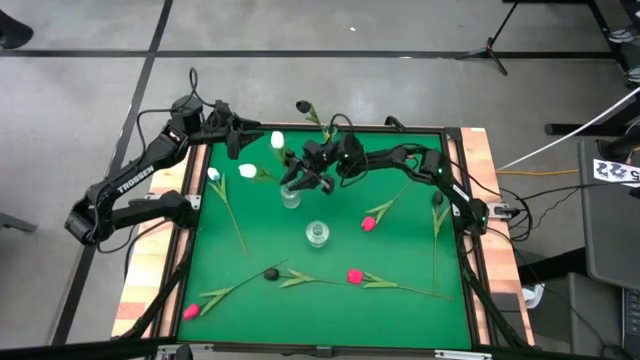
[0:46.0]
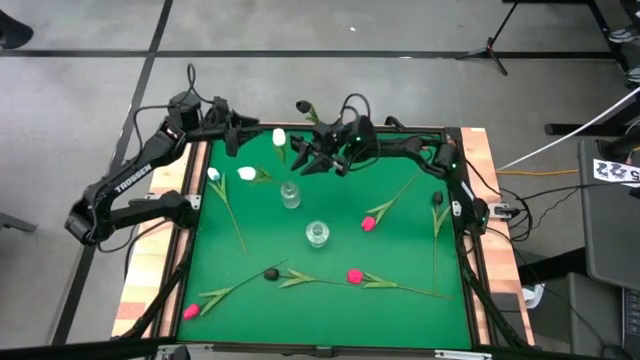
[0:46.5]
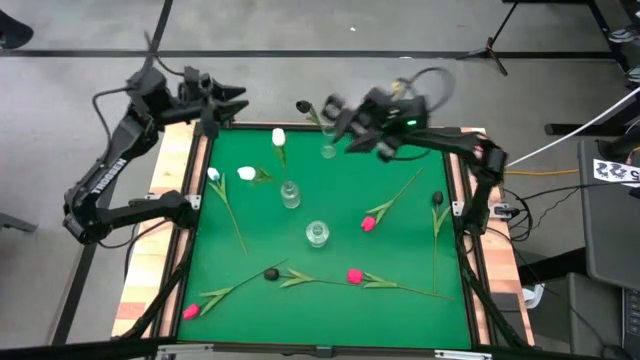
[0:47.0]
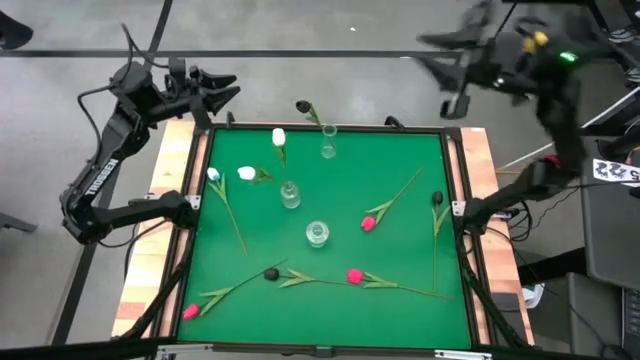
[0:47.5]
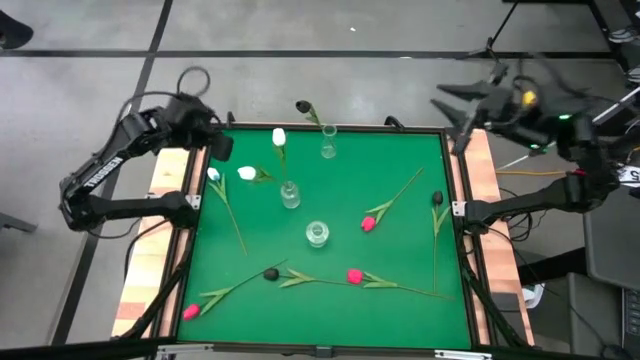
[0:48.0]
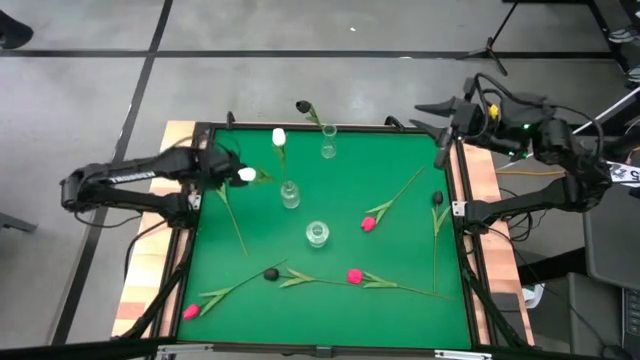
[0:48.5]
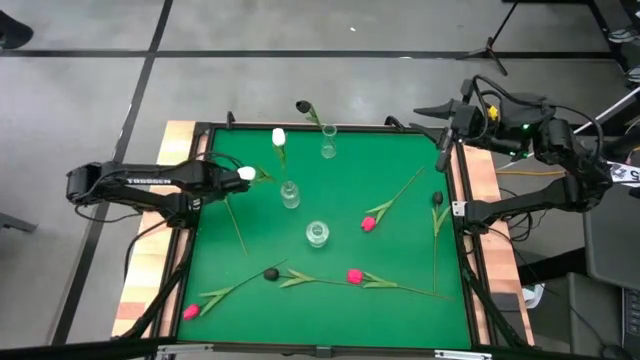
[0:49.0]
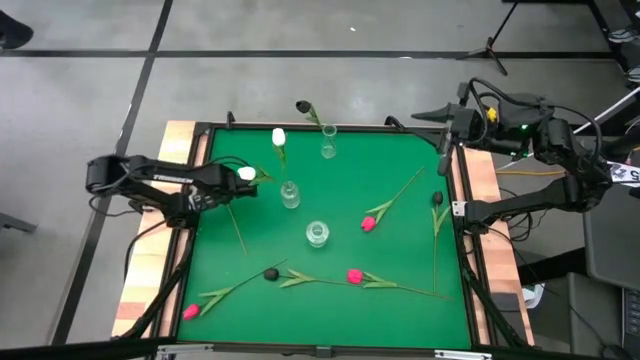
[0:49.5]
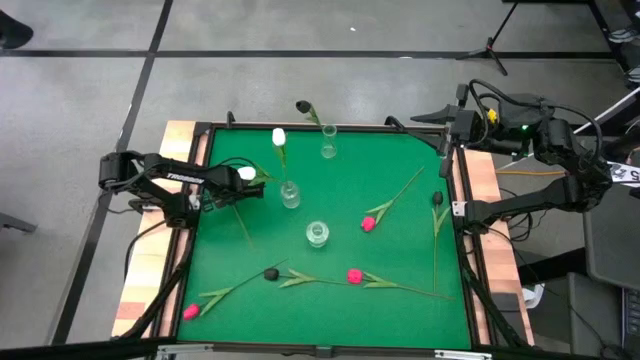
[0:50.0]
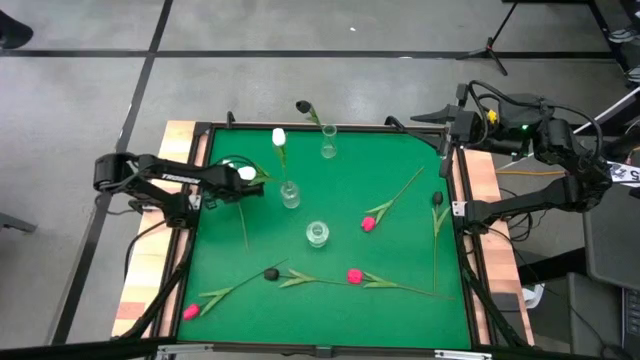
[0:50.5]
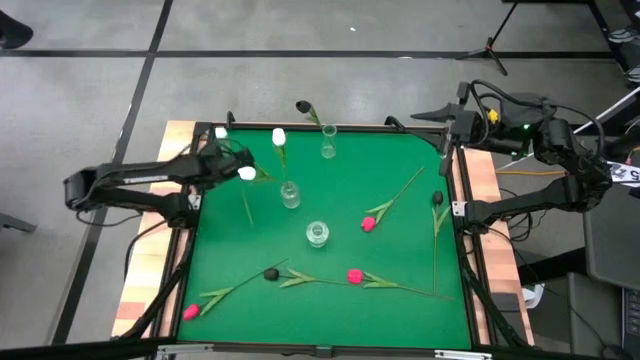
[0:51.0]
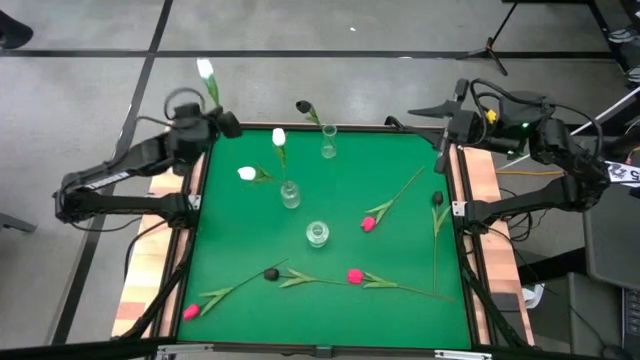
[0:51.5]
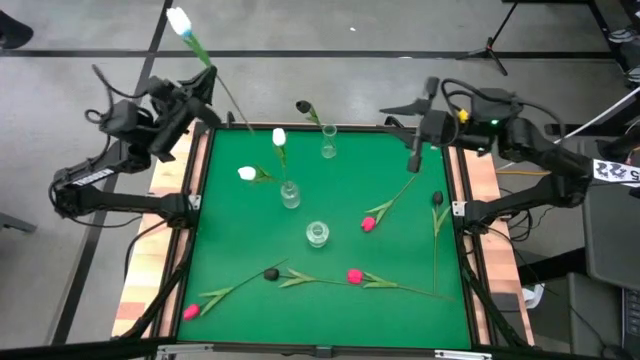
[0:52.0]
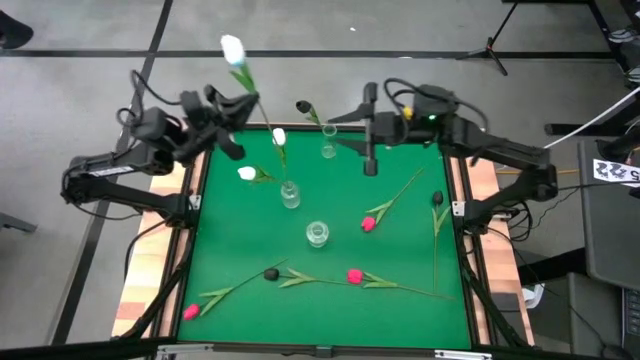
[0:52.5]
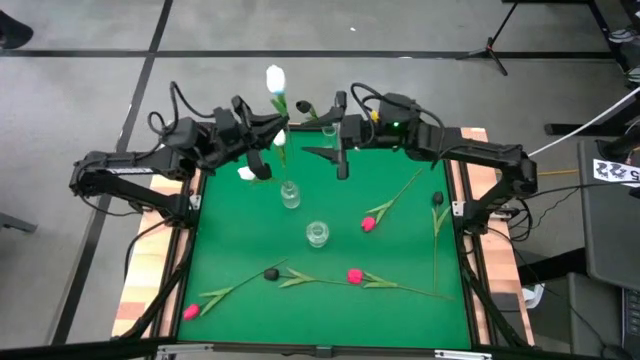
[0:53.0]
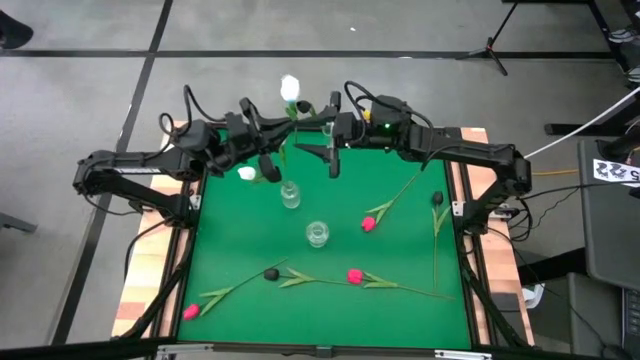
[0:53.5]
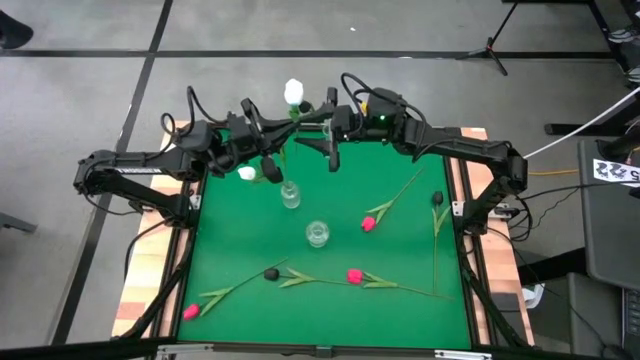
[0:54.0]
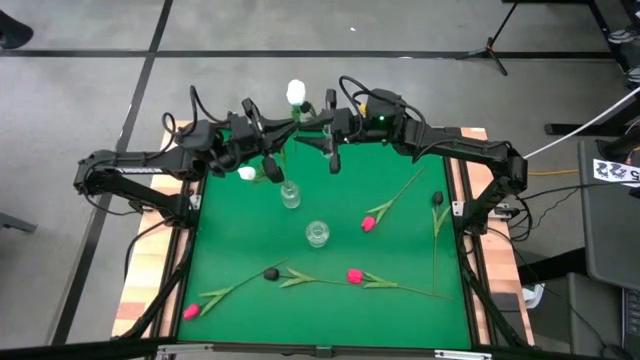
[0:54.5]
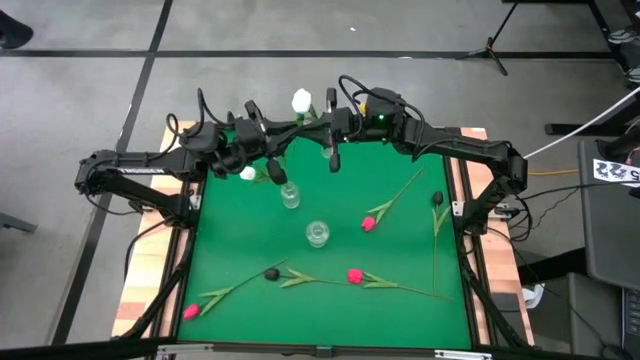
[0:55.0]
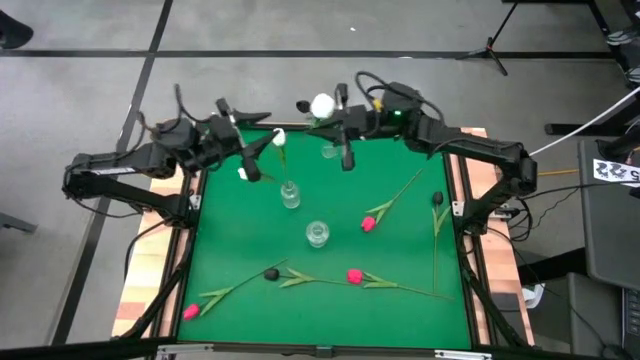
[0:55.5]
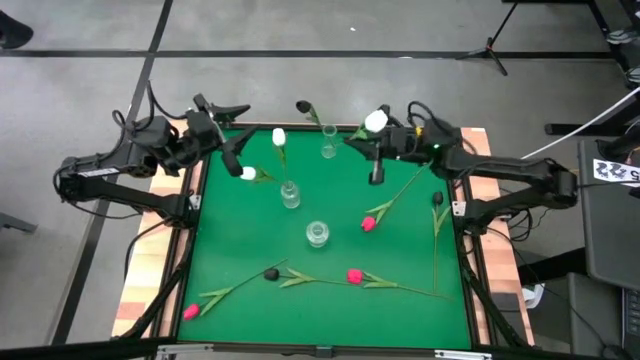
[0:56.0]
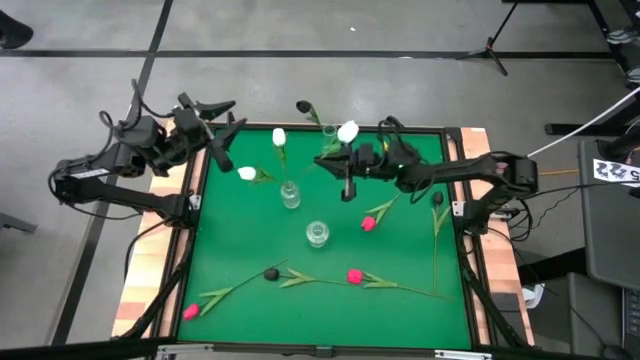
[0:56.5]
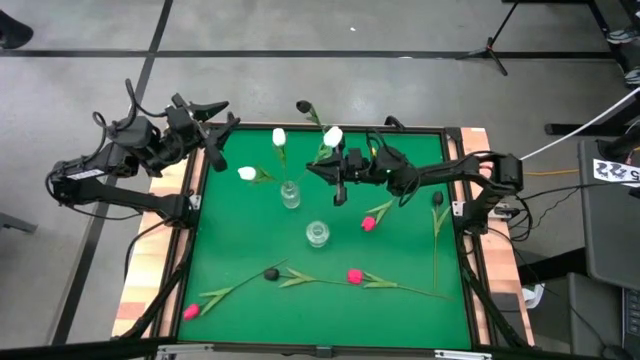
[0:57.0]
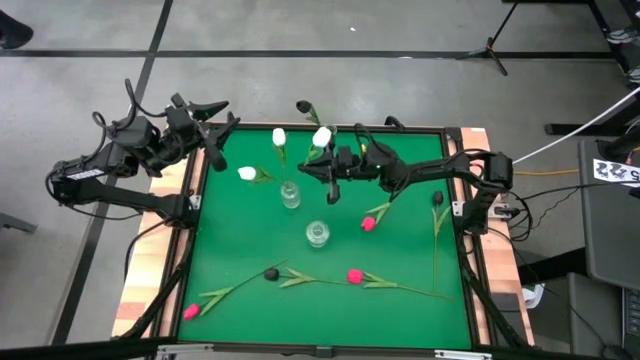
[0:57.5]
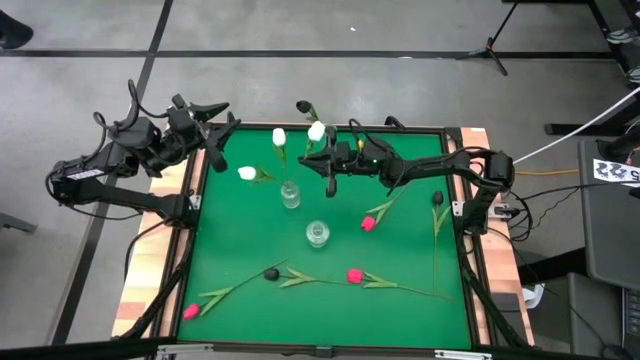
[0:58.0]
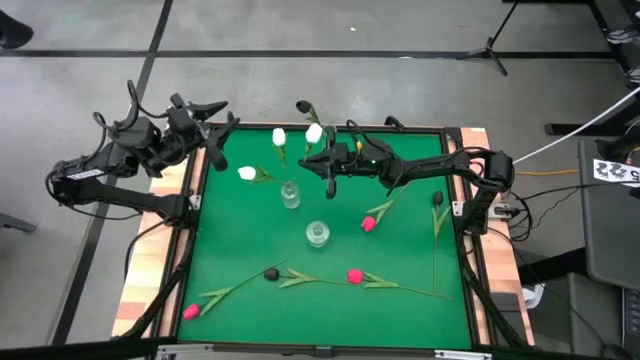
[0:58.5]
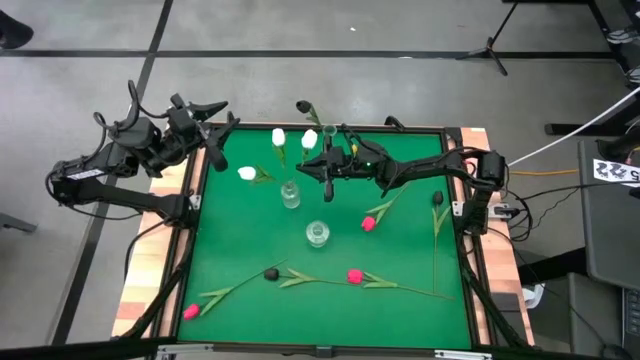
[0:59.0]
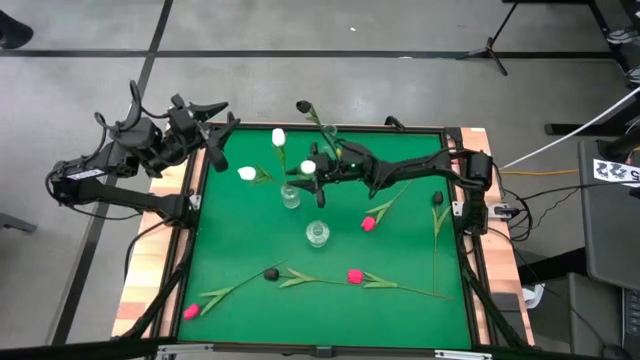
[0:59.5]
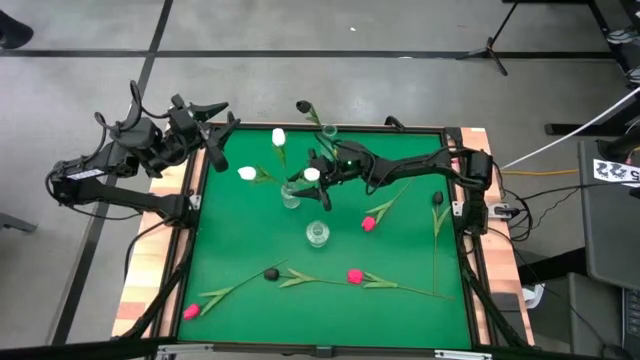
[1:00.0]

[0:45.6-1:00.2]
Task: Sort flowers into vase by color
Put the white flower into the middle transparent vase

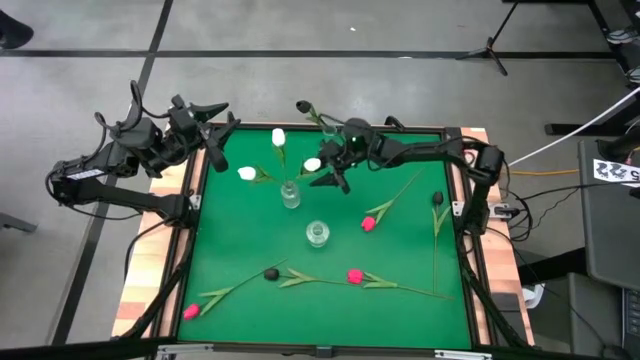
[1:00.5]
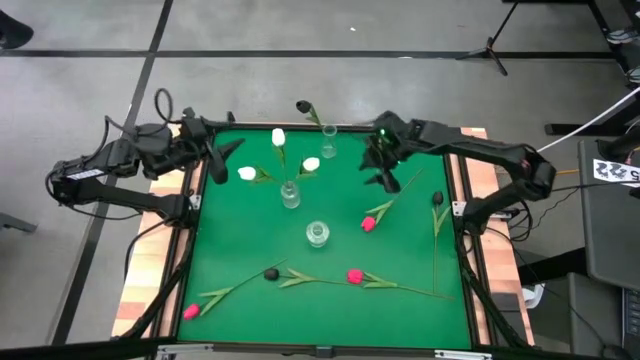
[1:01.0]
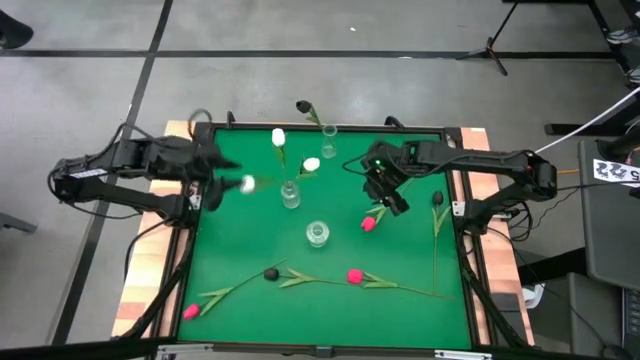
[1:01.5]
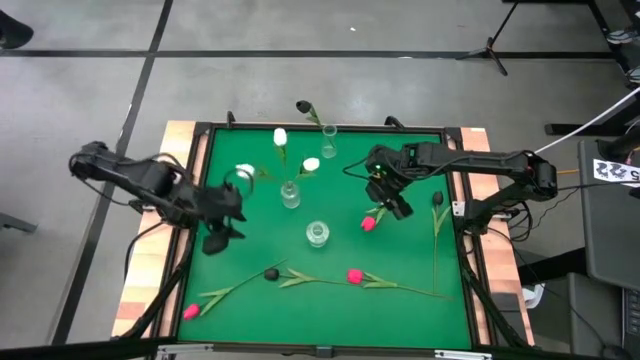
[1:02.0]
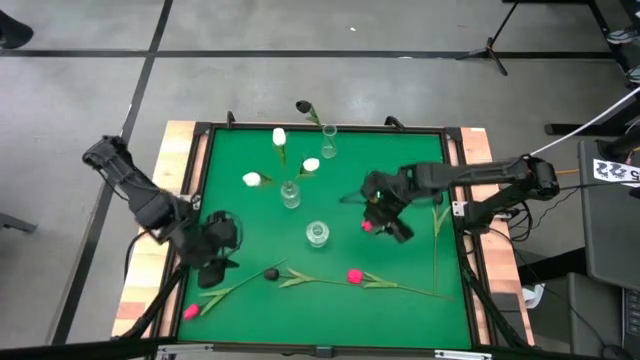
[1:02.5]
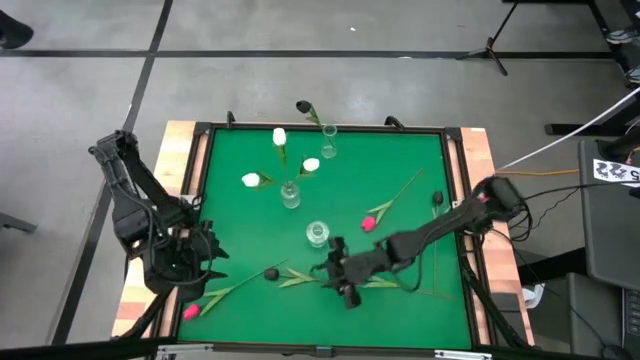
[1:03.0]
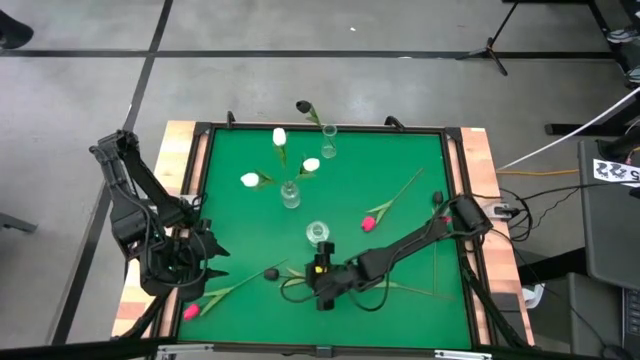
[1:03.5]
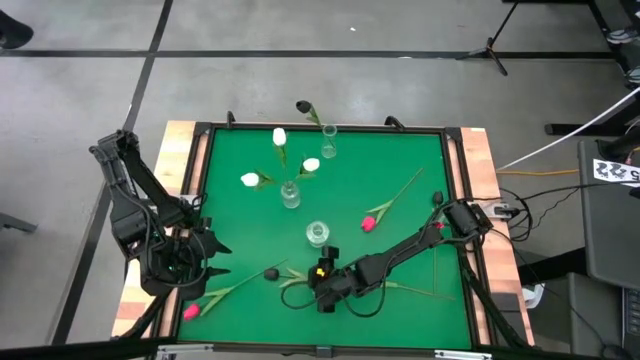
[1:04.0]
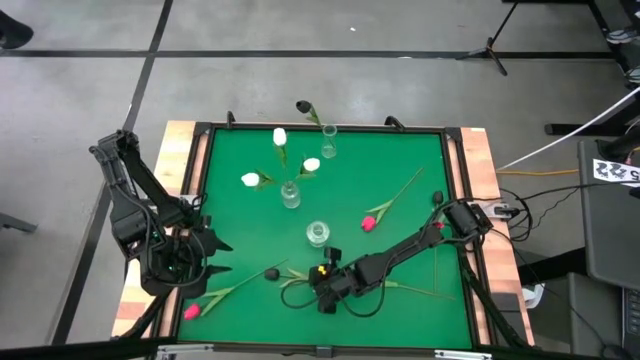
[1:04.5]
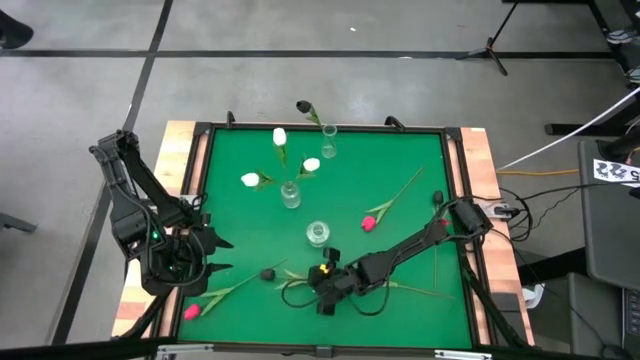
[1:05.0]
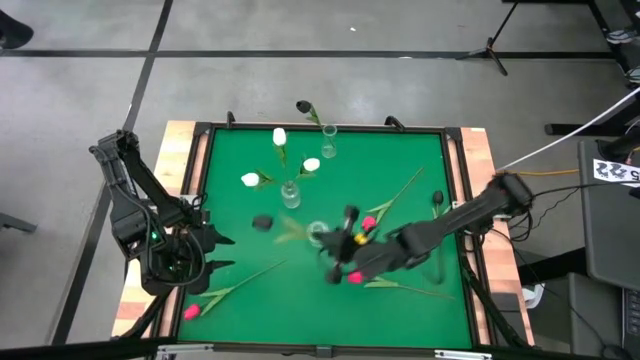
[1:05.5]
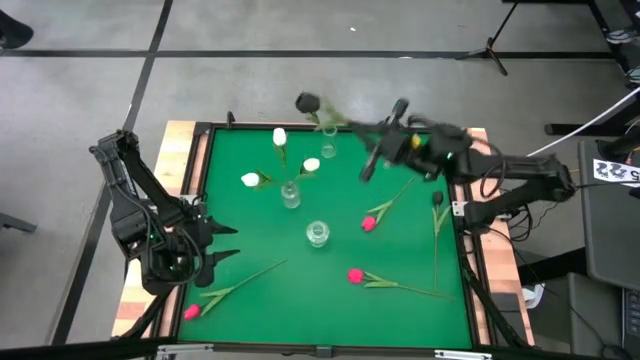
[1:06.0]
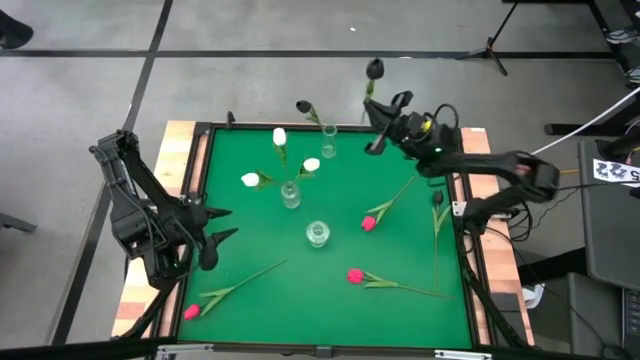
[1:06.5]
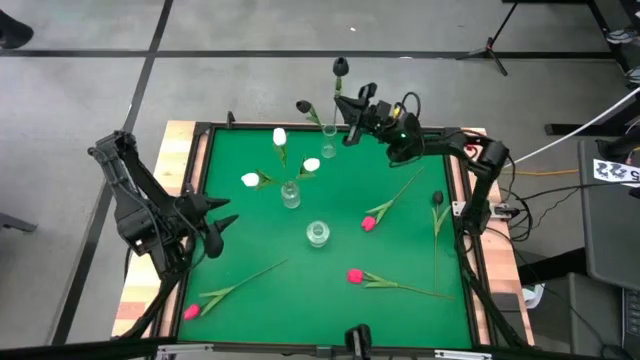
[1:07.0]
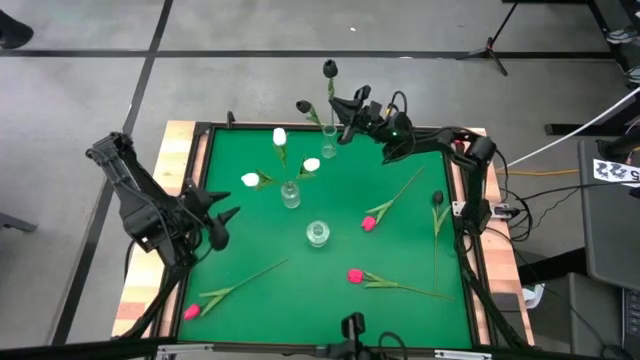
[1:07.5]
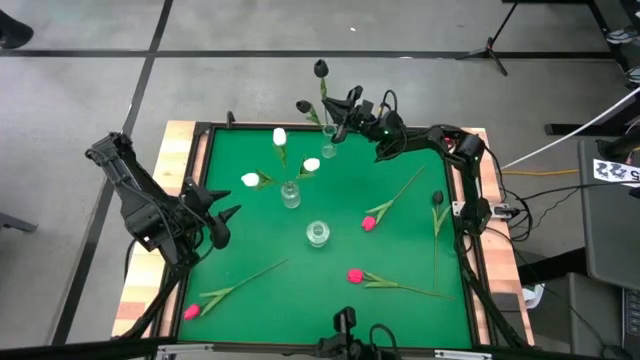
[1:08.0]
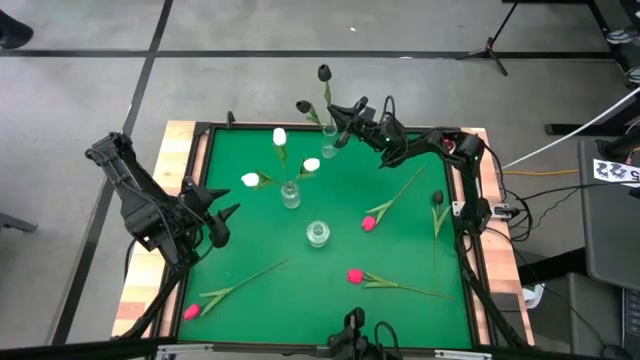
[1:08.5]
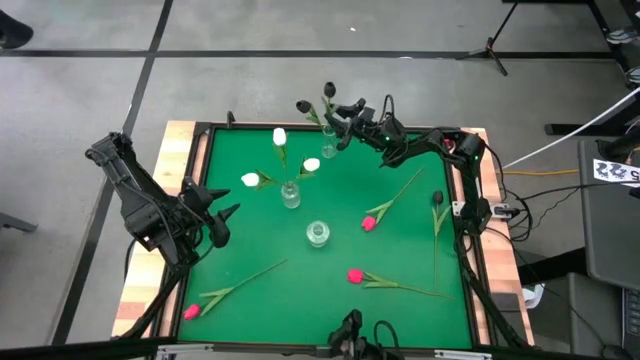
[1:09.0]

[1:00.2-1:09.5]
Put the bottom black flower into the top transparent vase
